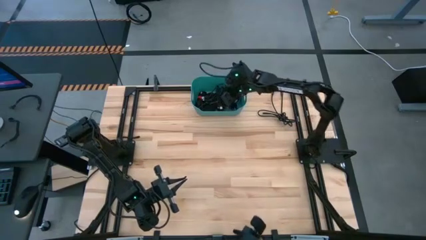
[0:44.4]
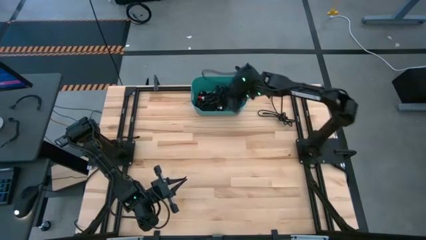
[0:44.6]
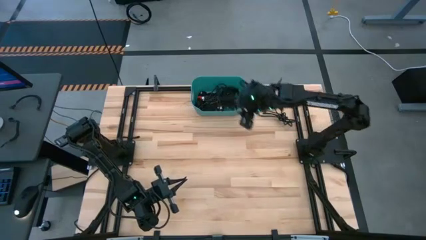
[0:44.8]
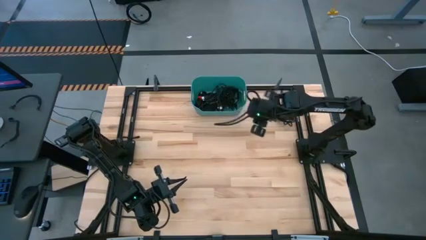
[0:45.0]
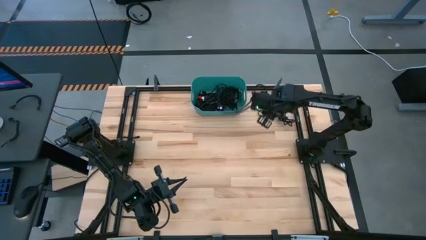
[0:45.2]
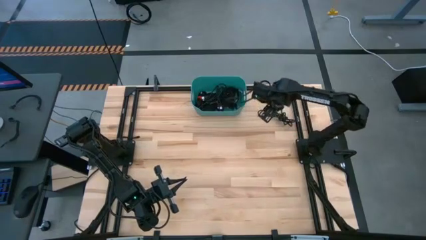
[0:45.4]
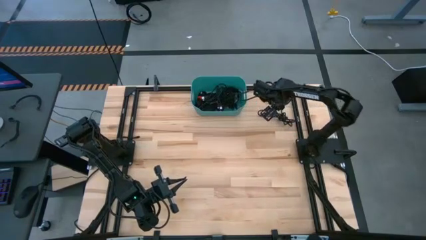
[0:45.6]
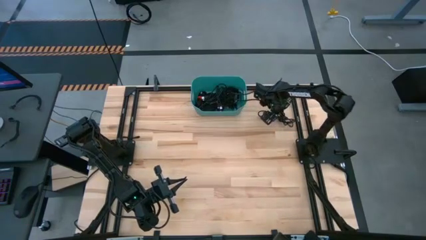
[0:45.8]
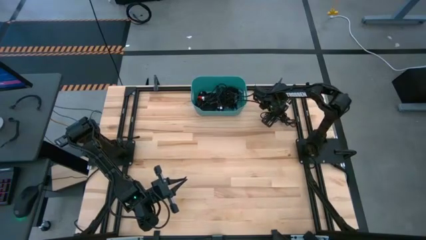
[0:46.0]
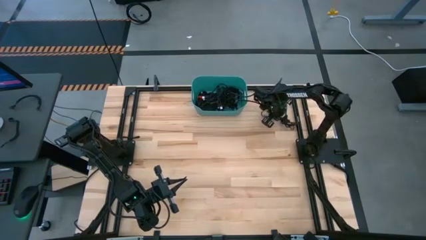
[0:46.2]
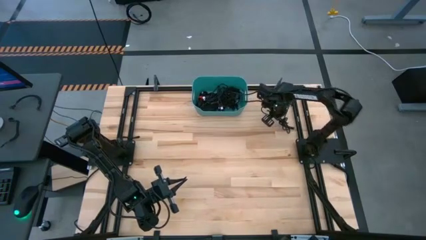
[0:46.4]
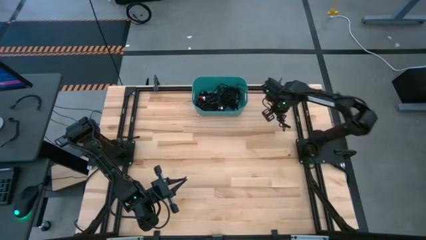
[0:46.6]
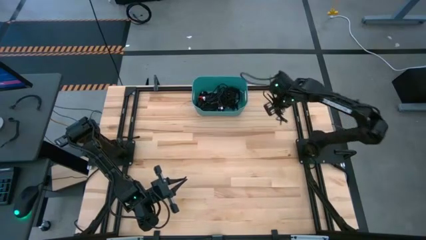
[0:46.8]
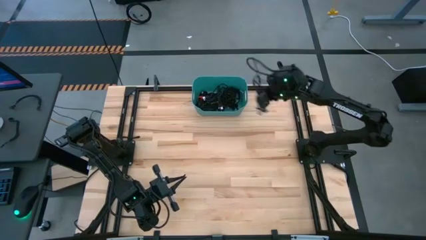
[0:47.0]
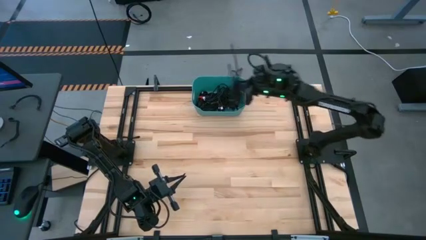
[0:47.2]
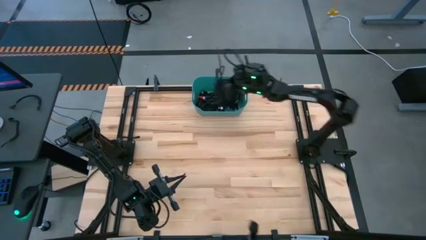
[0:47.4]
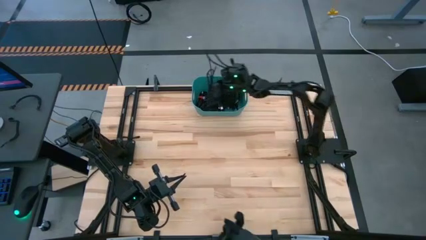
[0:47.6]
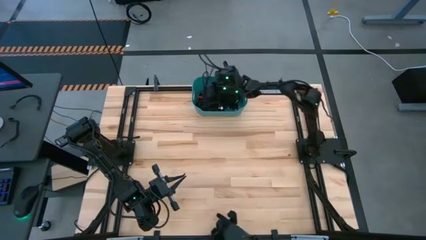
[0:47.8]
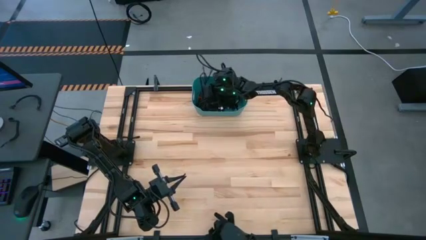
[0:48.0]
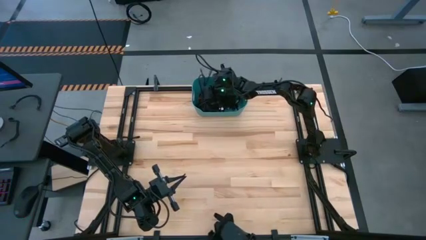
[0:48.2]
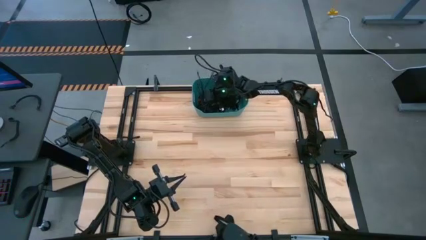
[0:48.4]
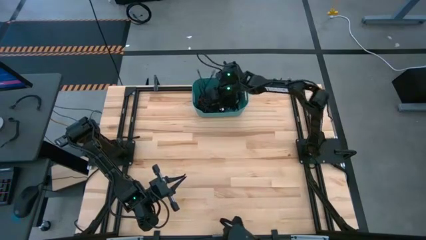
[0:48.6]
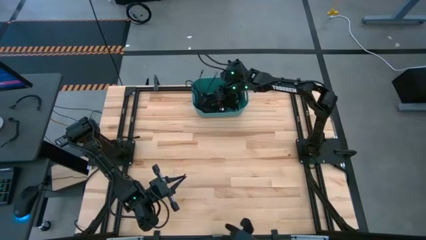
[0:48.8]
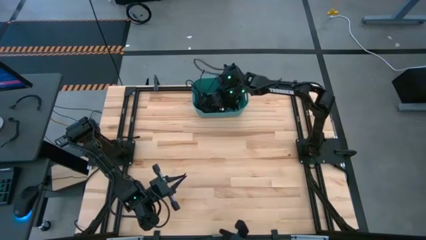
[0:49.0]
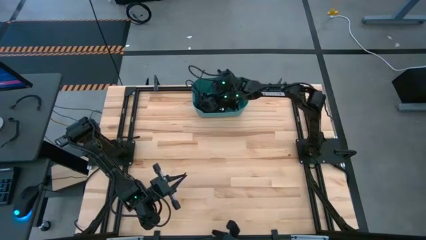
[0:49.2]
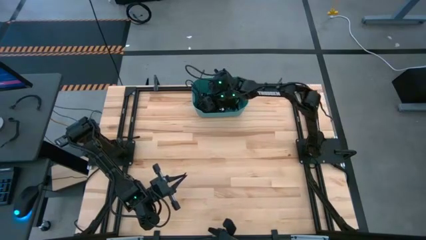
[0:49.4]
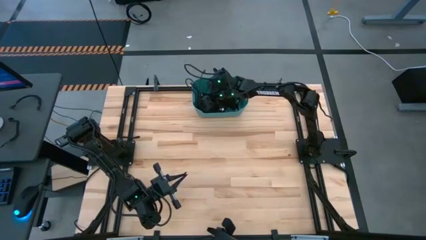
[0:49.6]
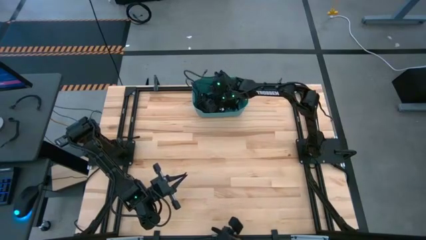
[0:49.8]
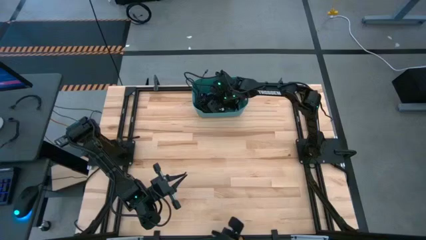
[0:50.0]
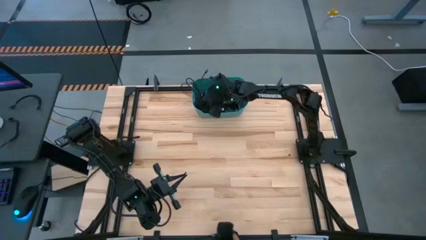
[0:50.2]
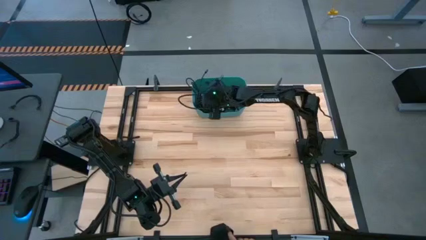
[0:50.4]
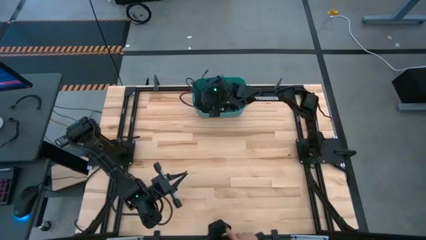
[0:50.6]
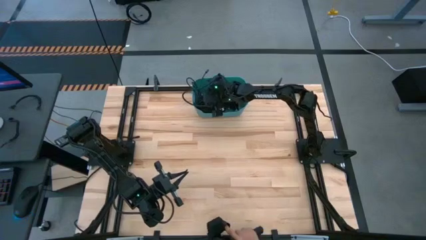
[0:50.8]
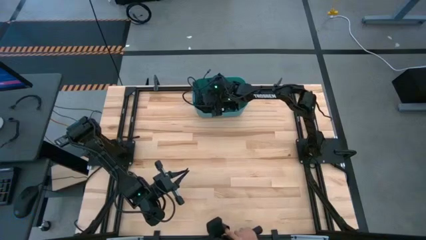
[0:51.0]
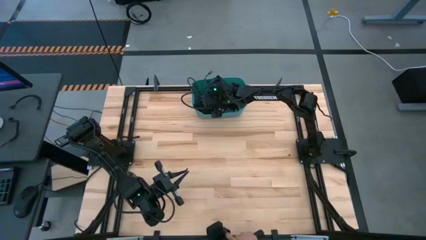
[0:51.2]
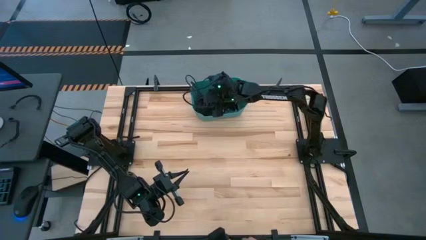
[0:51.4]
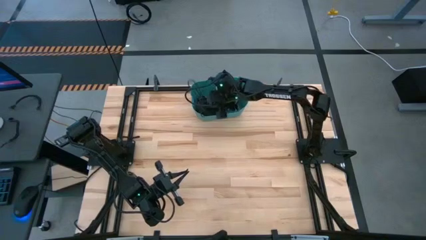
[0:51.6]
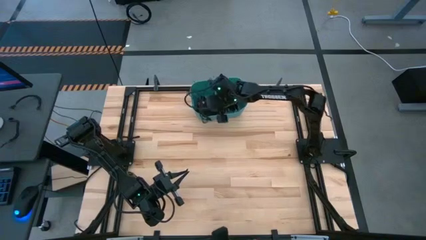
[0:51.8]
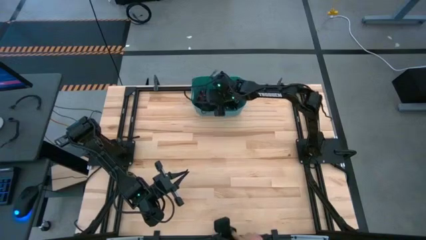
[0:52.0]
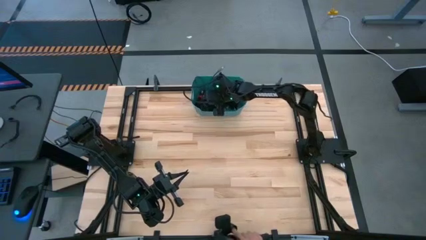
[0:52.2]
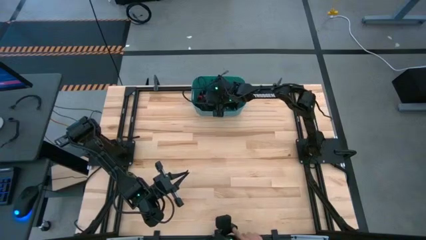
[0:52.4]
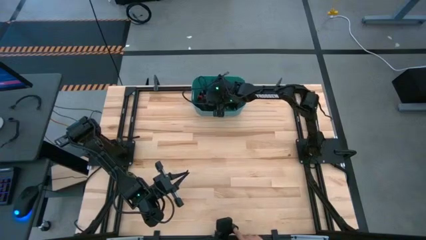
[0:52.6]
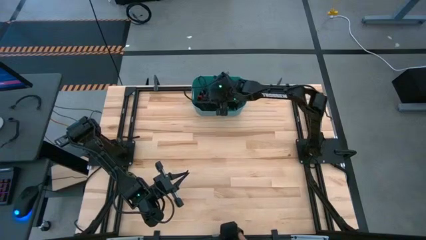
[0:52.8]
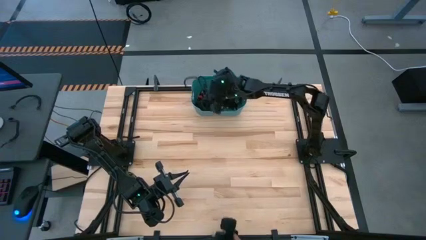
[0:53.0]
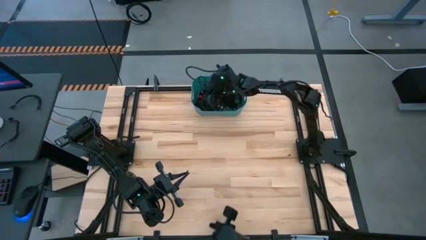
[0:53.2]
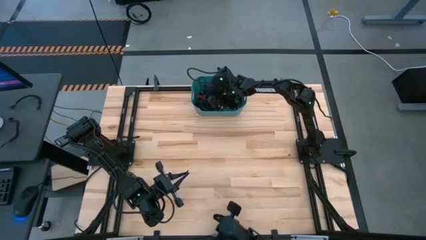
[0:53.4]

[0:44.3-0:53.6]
Task: Pick and place USB-C Cables
Put the black charger cable into the blue bin

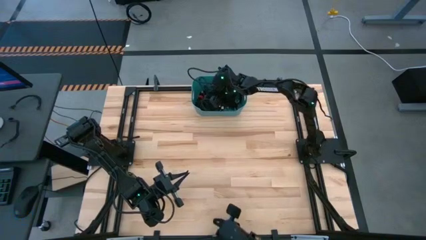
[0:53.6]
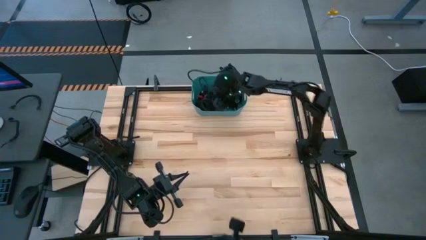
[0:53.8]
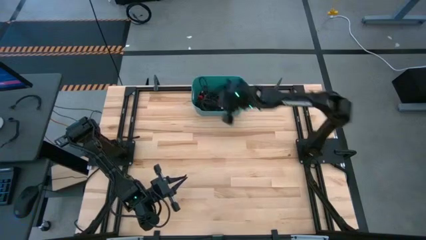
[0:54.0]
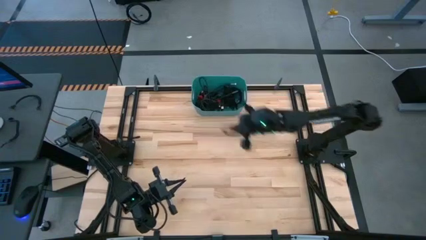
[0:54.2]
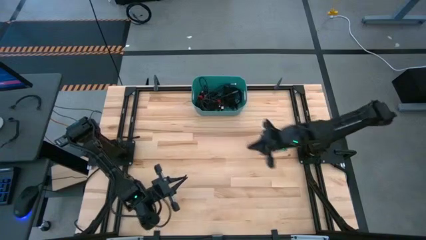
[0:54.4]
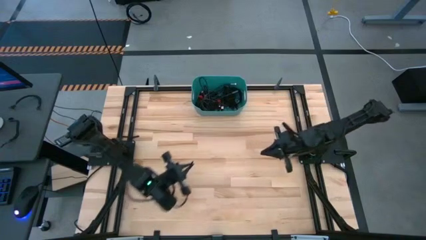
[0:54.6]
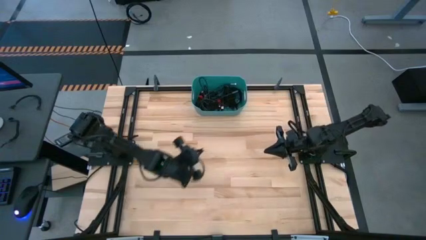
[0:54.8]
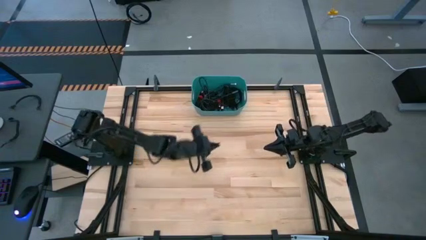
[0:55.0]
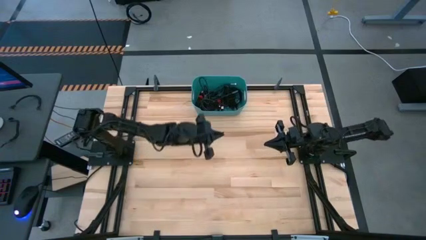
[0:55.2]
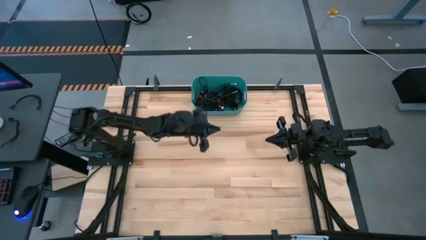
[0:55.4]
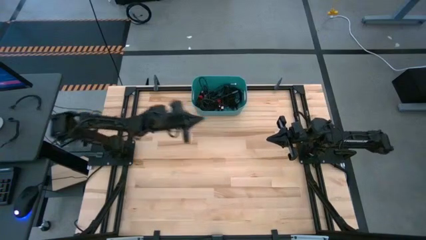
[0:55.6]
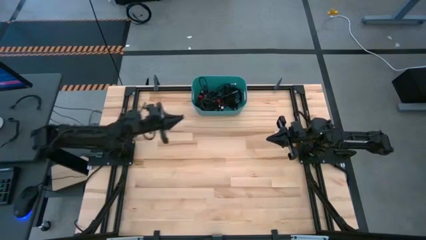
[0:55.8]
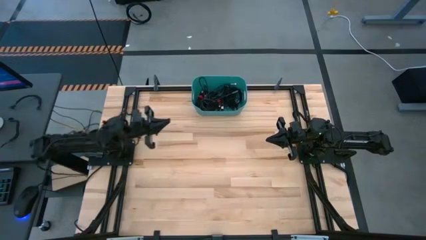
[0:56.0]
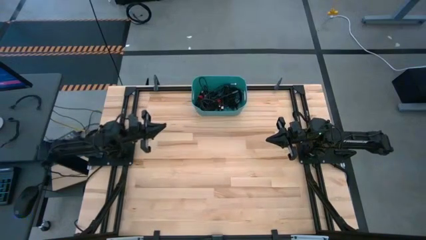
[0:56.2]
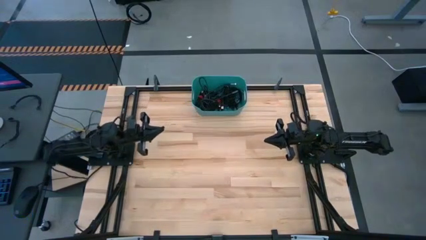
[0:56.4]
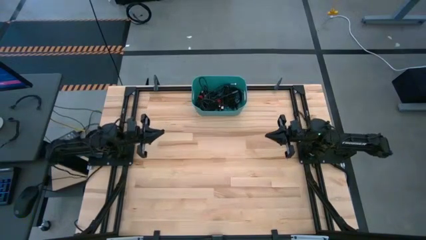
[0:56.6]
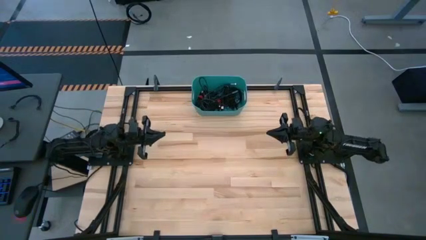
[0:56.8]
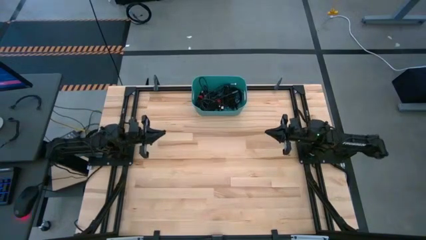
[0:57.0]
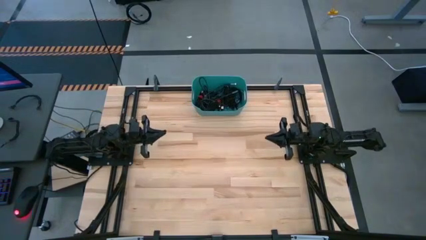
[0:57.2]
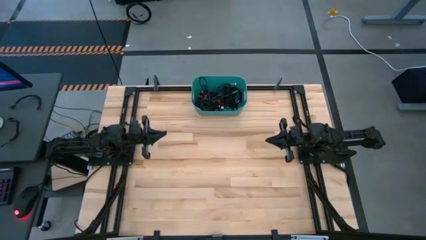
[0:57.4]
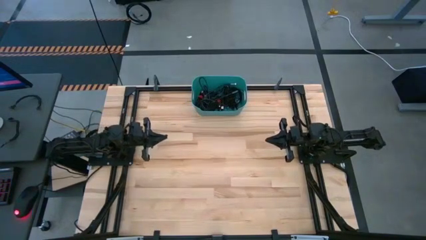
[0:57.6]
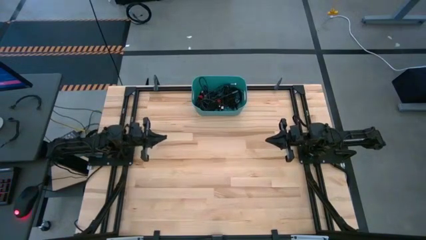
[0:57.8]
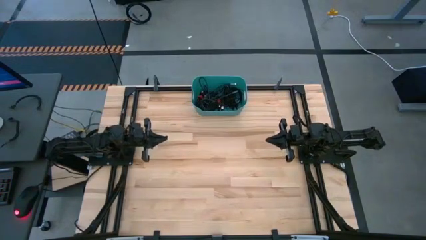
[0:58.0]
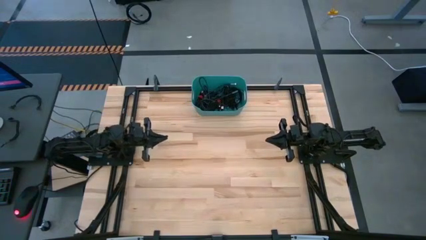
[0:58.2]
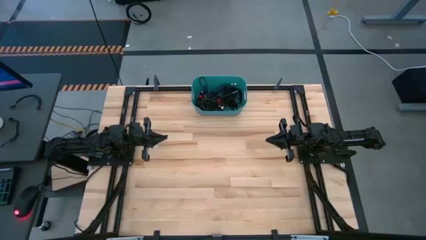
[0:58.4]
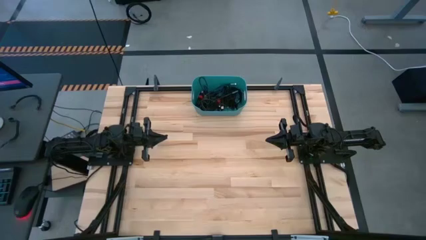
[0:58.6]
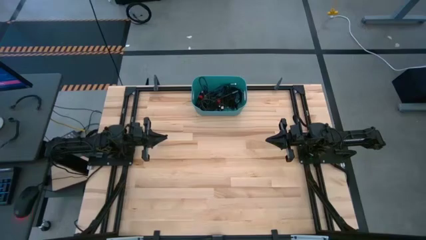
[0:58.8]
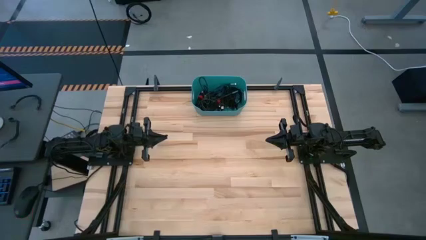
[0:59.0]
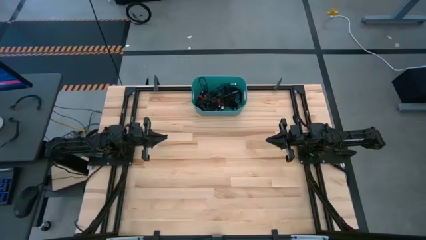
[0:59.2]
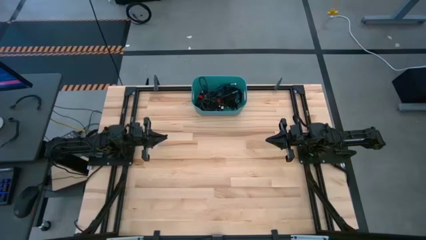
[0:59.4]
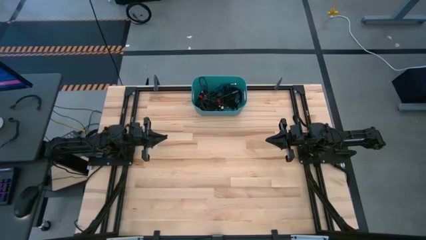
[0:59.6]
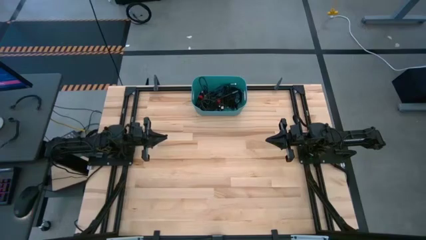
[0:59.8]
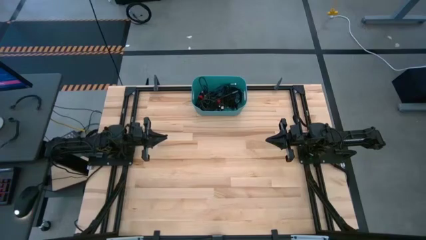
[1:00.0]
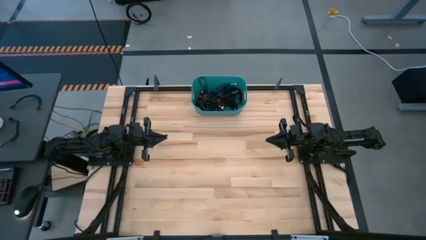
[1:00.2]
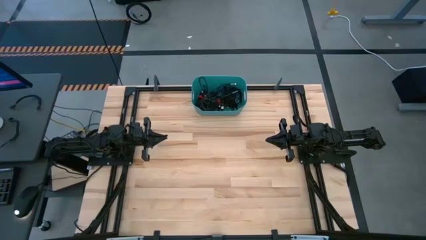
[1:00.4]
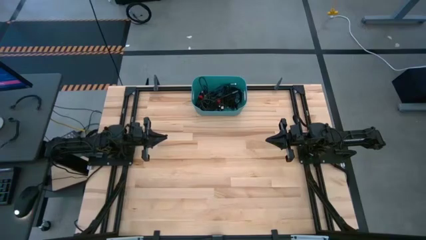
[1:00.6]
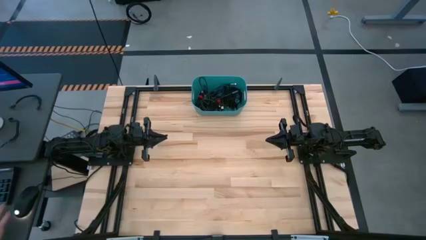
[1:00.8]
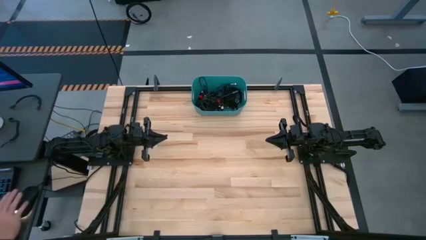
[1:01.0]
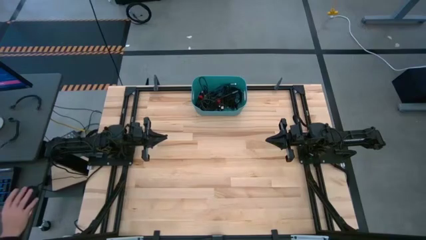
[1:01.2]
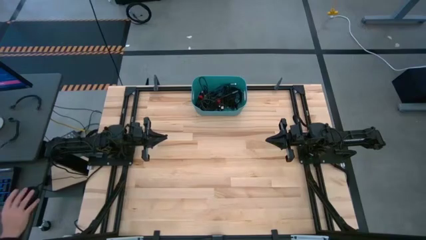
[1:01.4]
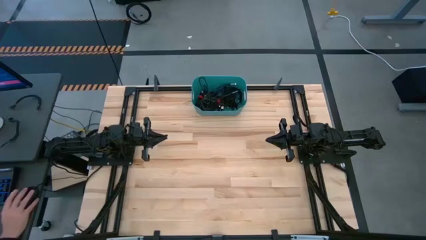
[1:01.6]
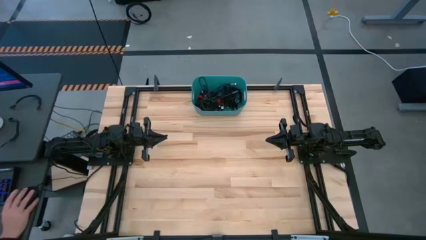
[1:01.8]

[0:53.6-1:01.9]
Return to Home Position
